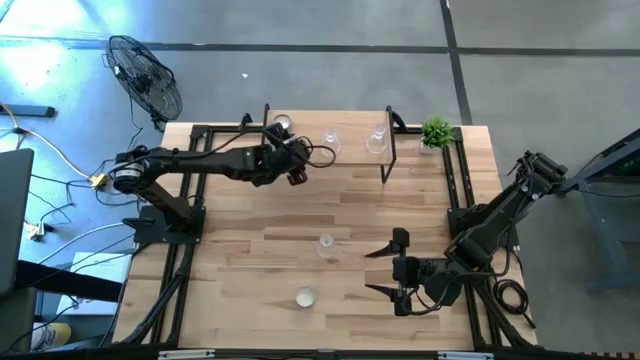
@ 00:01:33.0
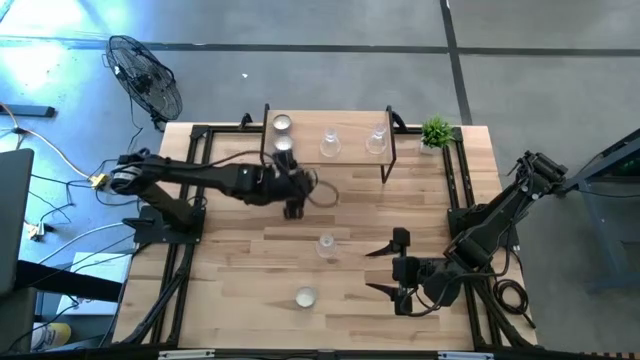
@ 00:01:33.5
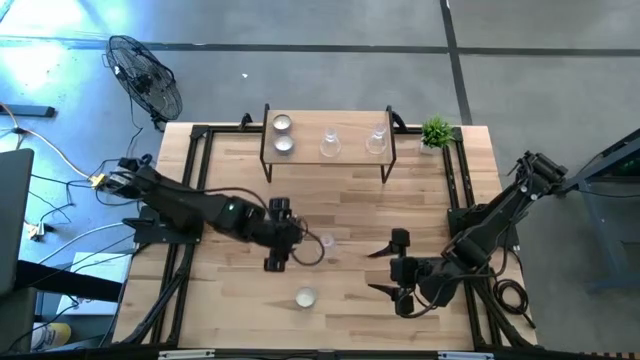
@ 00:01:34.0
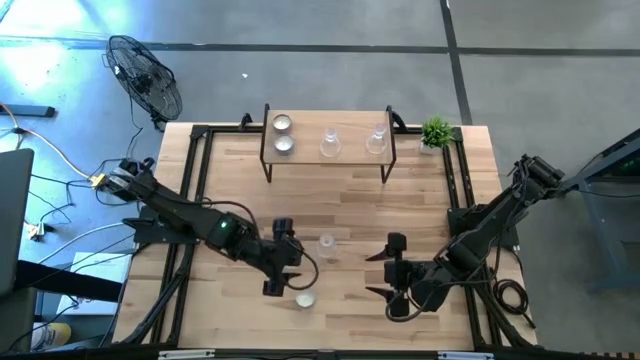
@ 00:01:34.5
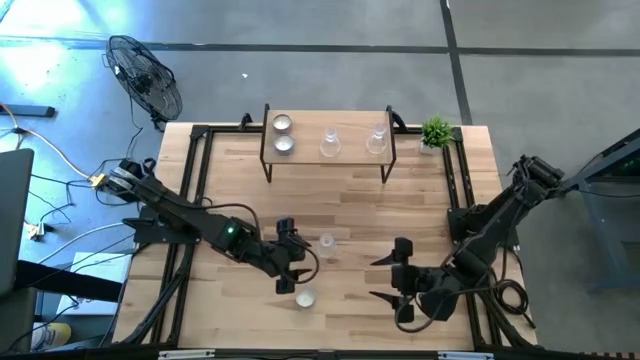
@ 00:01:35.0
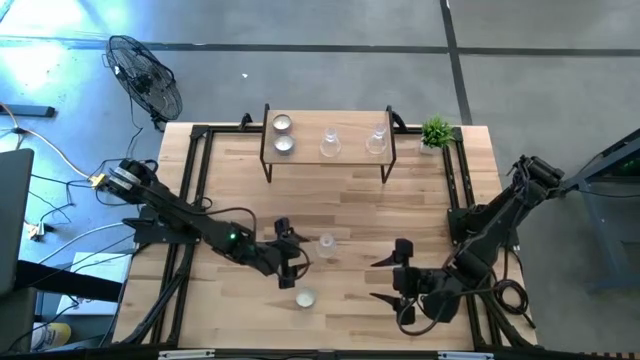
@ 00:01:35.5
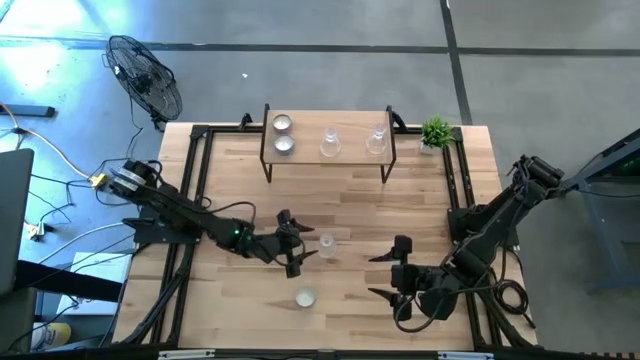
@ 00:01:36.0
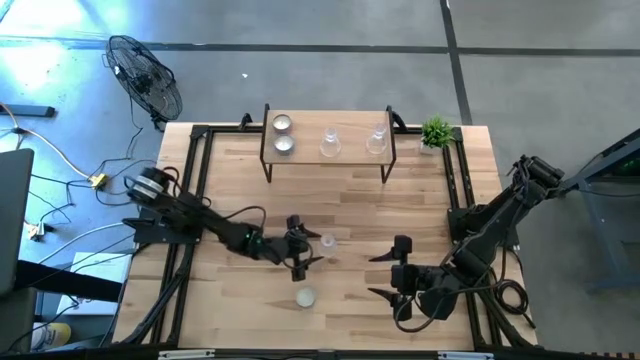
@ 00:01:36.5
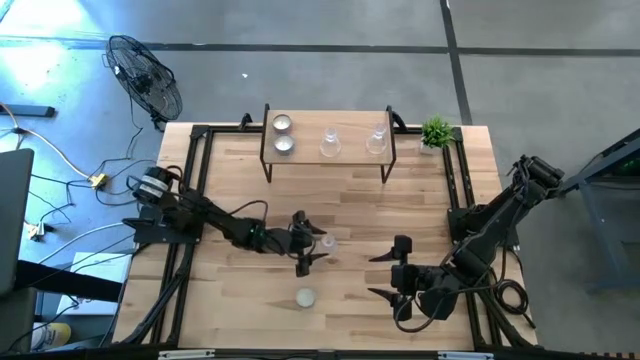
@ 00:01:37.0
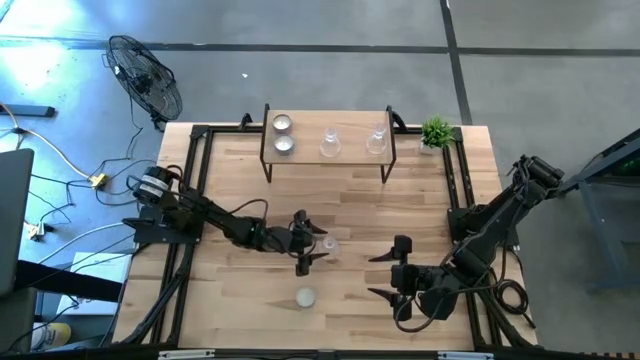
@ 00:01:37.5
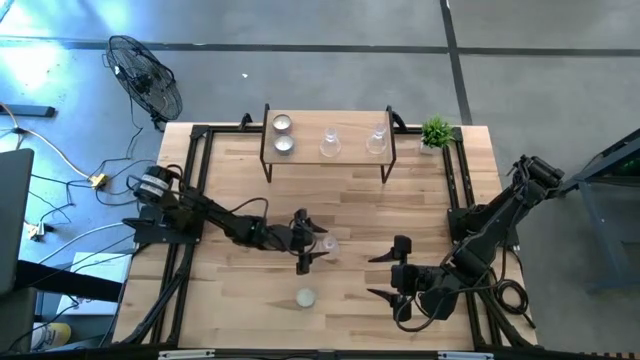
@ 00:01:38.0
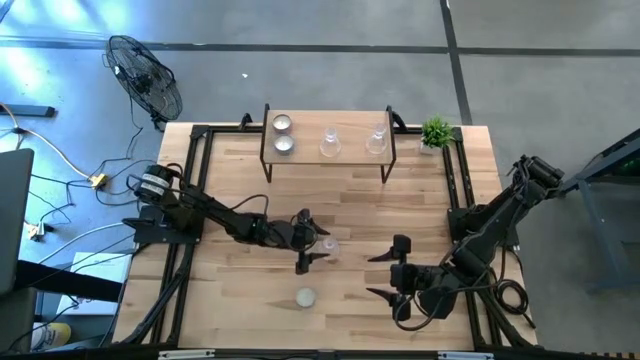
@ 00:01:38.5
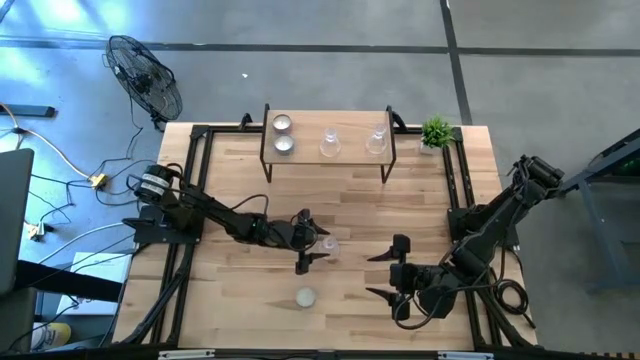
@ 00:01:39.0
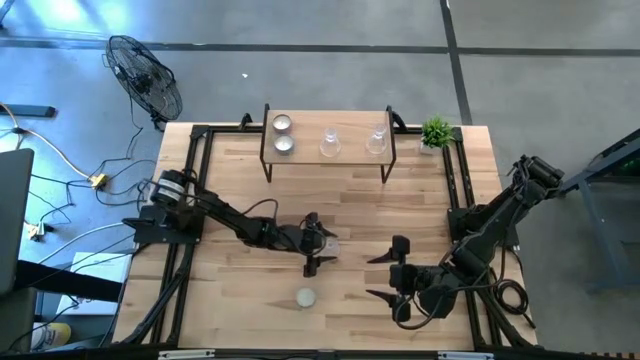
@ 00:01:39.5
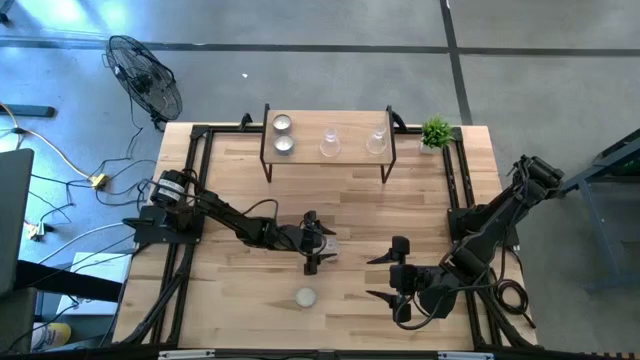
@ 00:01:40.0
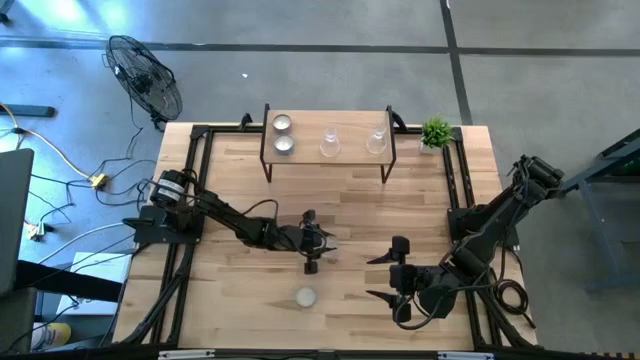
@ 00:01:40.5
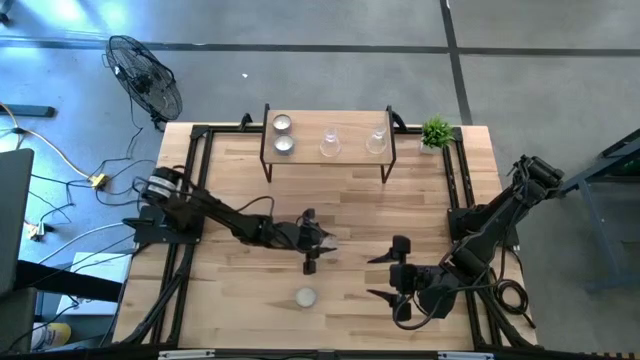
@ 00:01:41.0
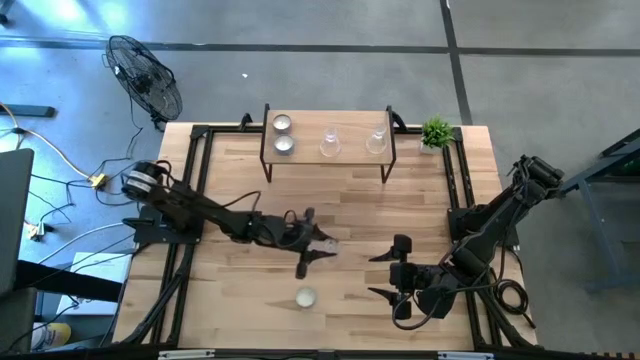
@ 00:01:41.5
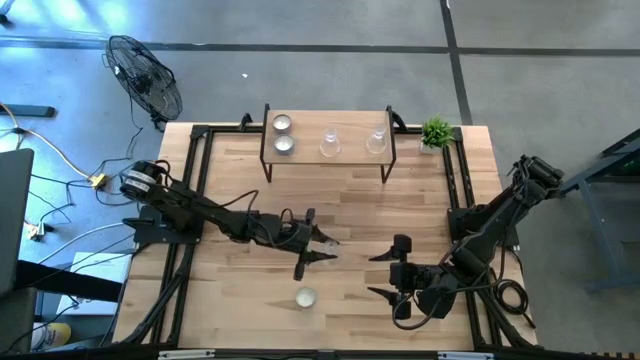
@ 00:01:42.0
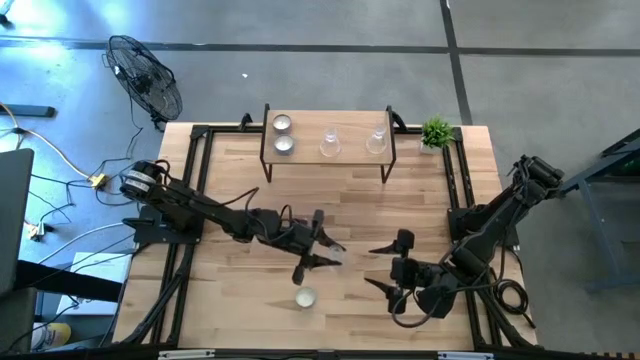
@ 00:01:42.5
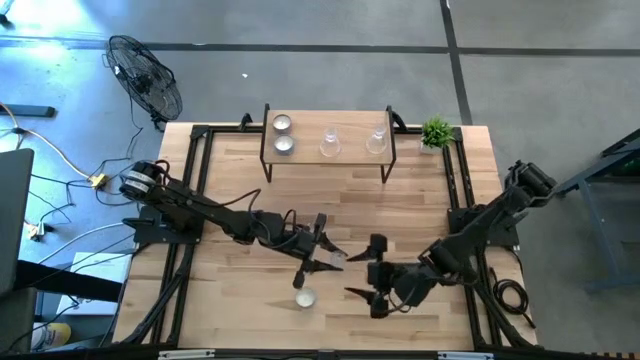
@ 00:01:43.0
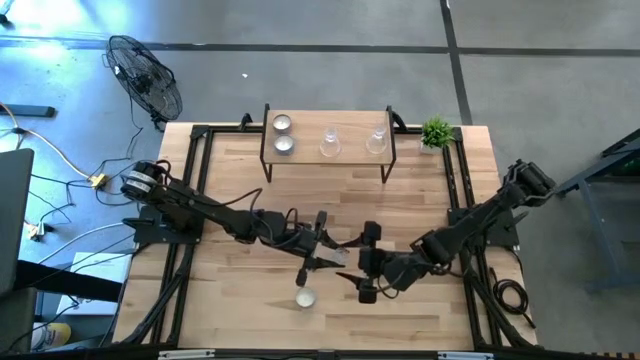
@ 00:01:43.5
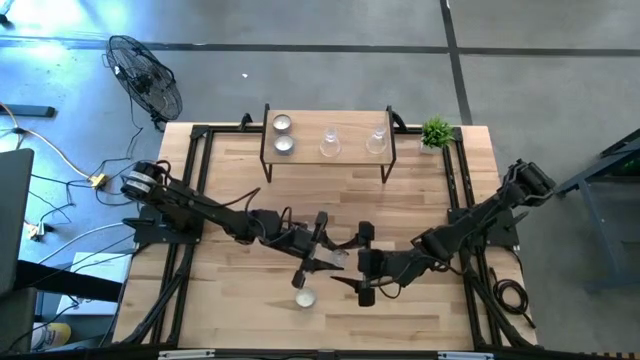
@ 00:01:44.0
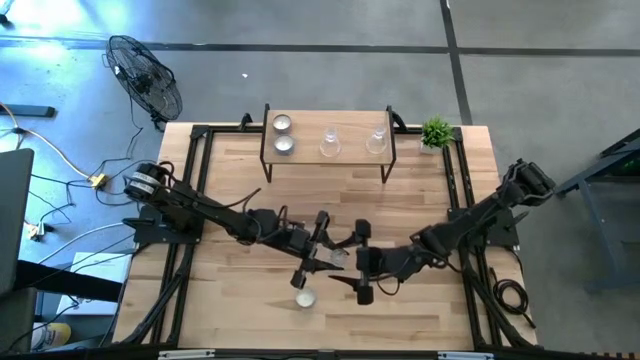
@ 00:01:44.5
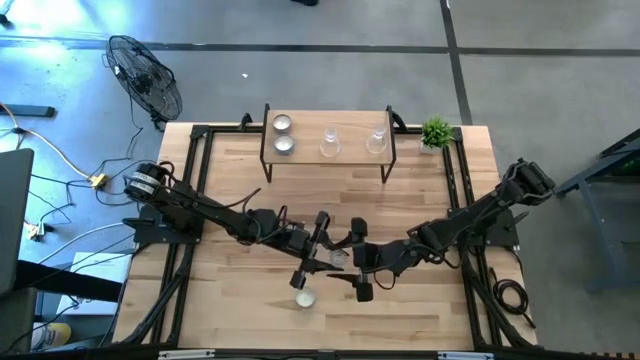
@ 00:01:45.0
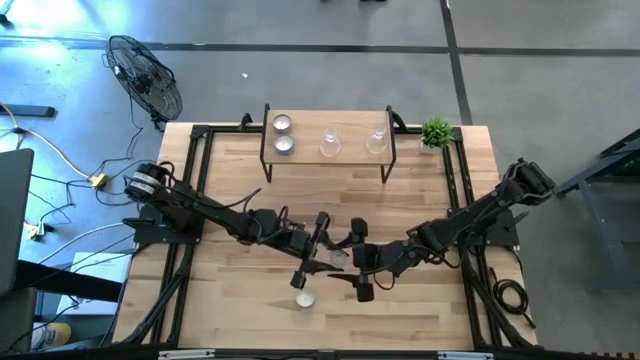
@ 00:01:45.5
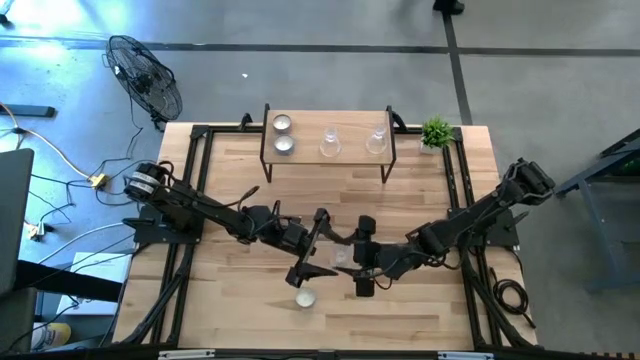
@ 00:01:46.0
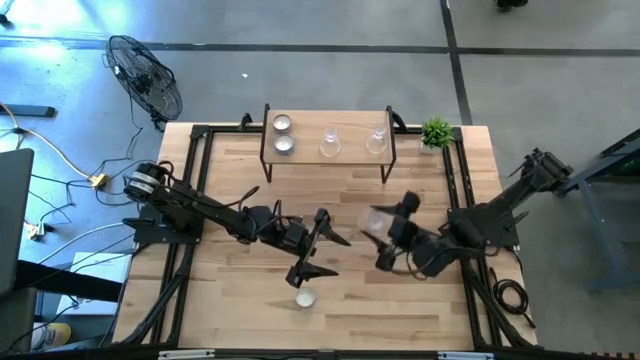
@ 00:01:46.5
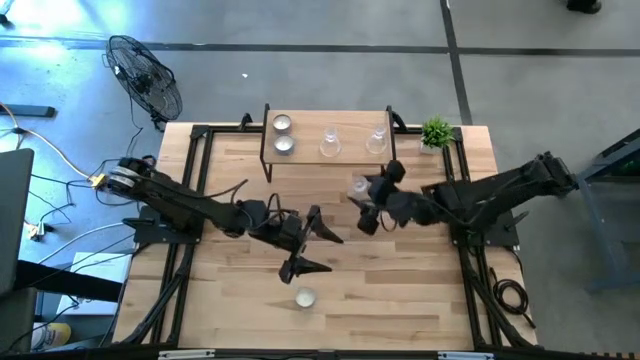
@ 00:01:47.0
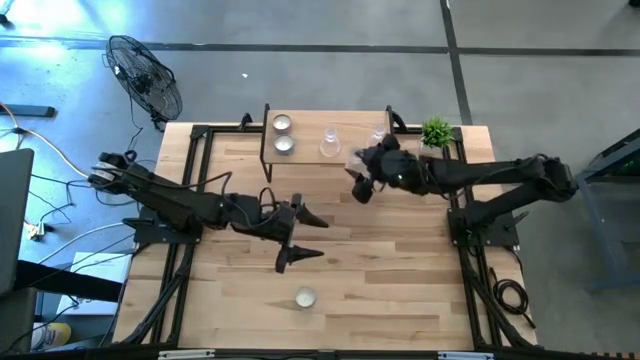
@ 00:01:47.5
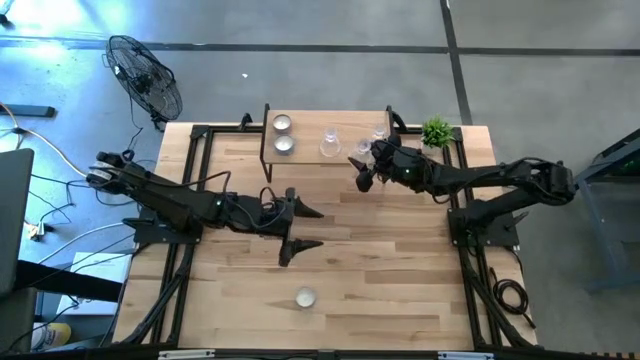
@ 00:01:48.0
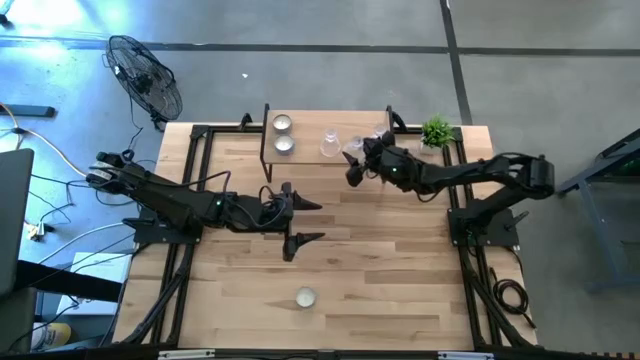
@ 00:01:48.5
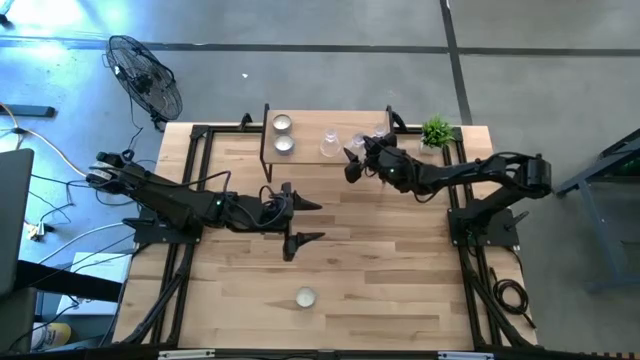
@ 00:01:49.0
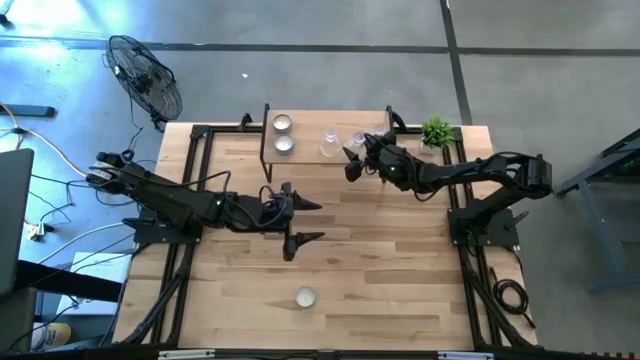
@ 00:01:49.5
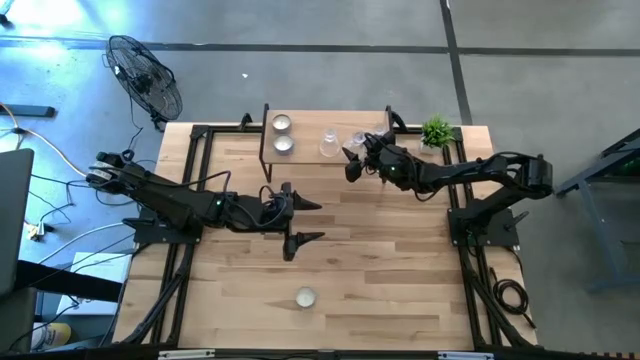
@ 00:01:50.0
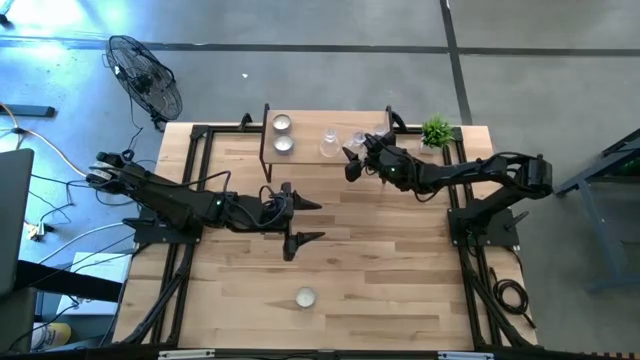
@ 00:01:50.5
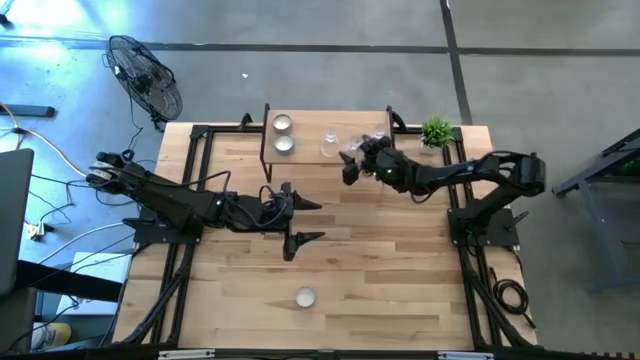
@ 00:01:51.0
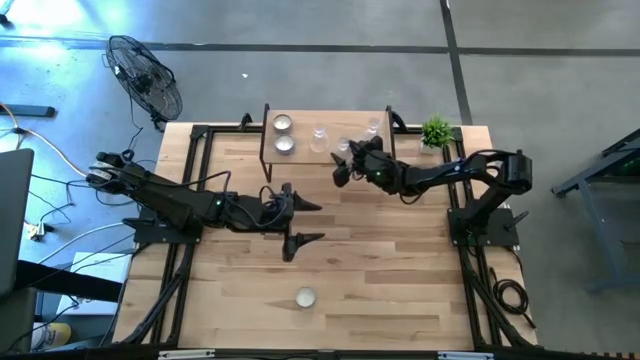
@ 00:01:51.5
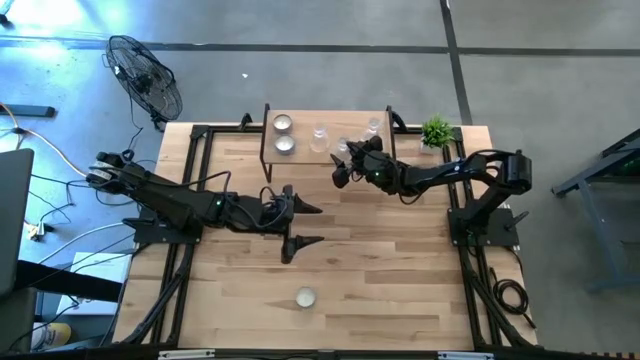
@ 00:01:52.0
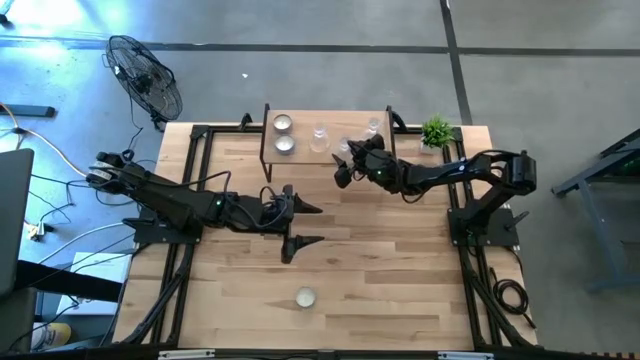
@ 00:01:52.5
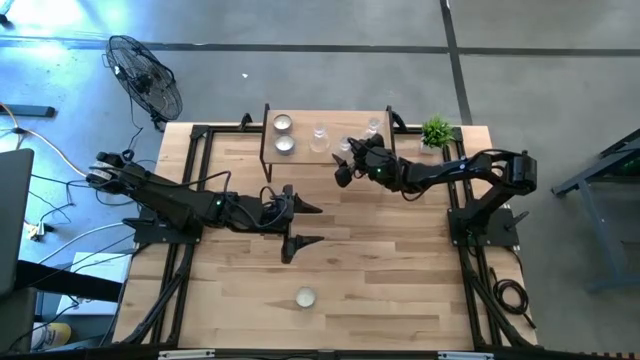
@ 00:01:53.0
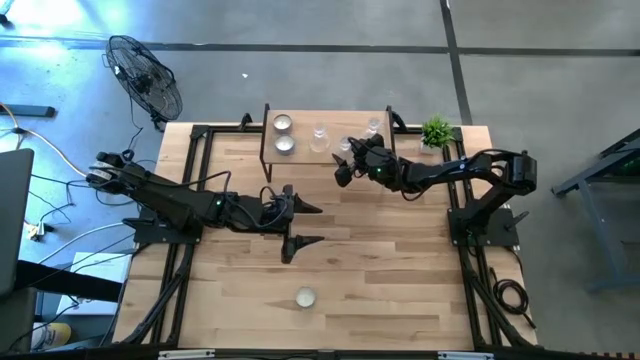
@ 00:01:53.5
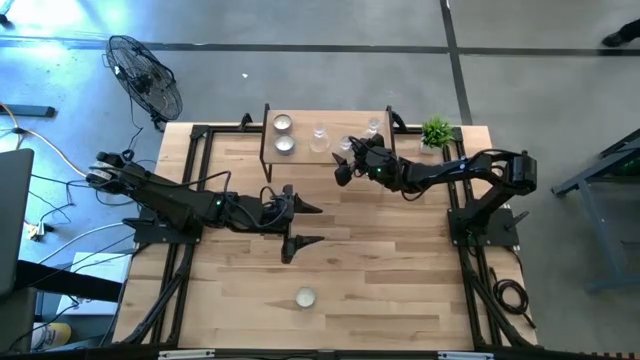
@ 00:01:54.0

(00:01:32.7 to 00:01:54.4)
Task: Pick & Place candle stick holders
Put the transparent candle holder on the shelf
